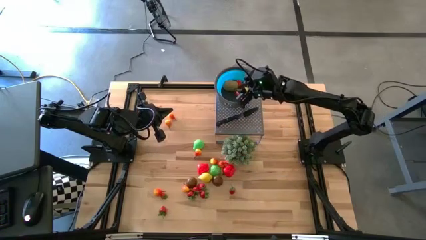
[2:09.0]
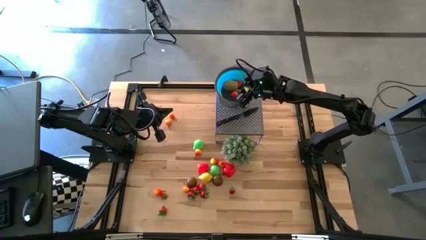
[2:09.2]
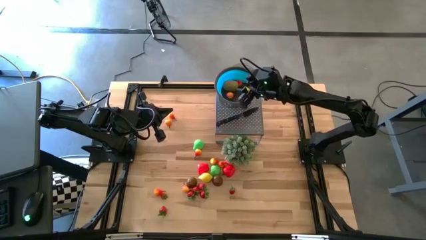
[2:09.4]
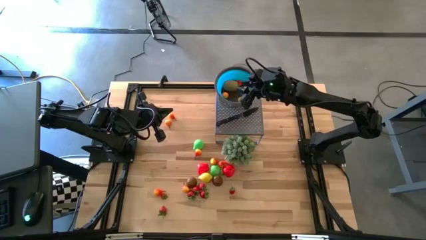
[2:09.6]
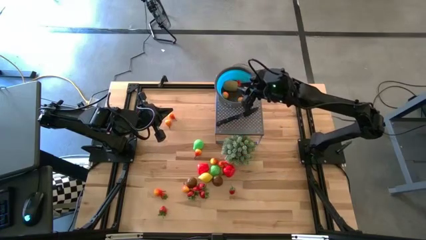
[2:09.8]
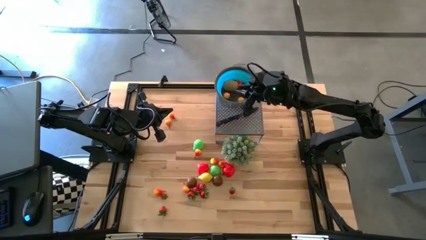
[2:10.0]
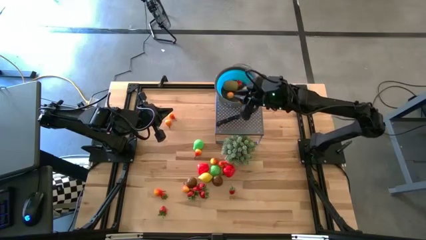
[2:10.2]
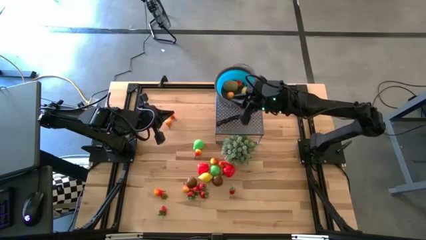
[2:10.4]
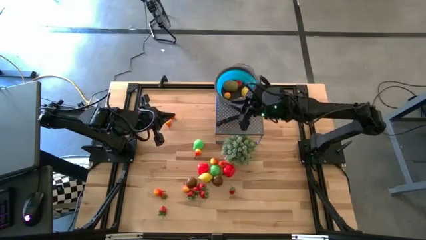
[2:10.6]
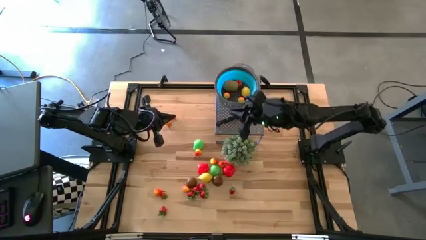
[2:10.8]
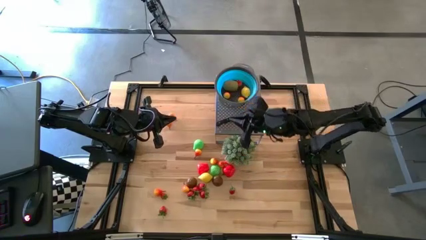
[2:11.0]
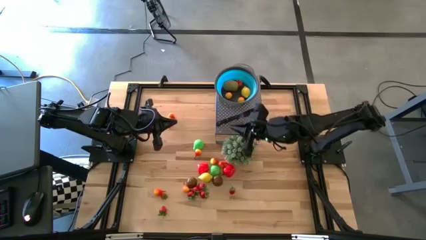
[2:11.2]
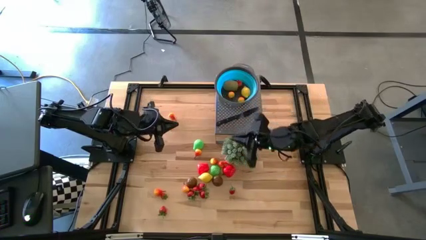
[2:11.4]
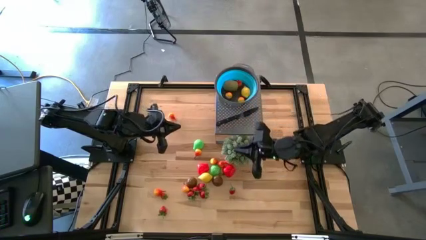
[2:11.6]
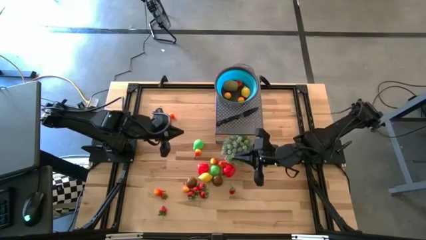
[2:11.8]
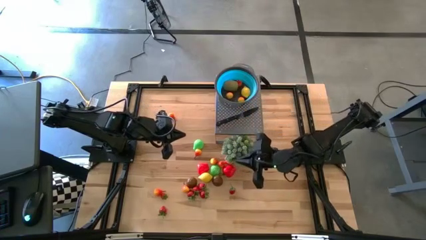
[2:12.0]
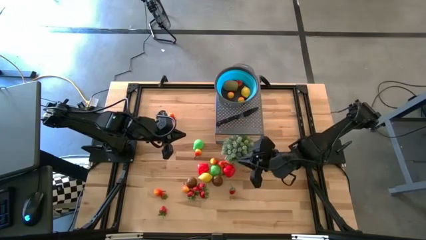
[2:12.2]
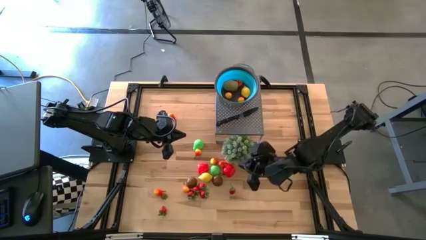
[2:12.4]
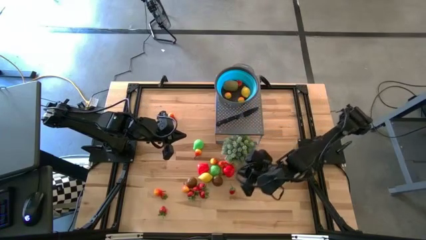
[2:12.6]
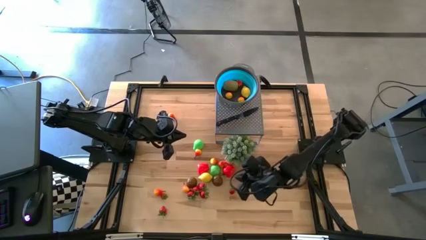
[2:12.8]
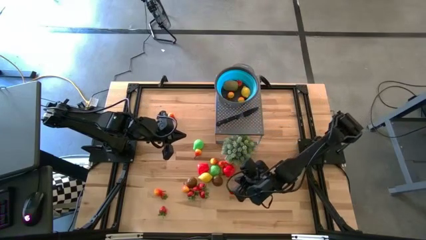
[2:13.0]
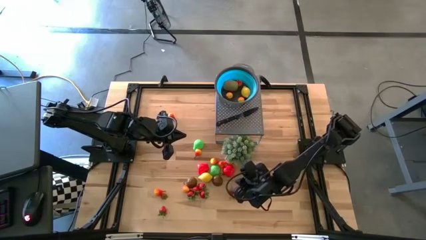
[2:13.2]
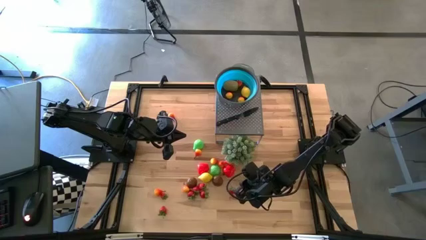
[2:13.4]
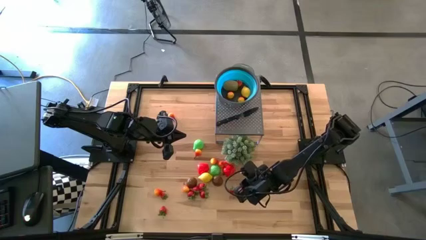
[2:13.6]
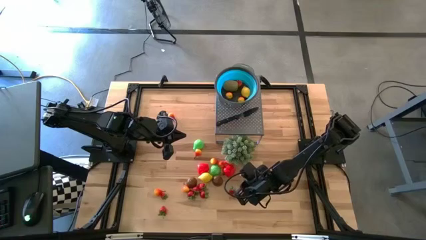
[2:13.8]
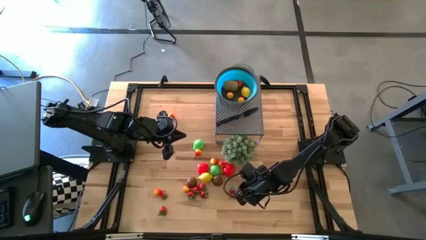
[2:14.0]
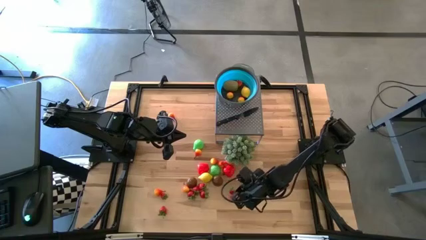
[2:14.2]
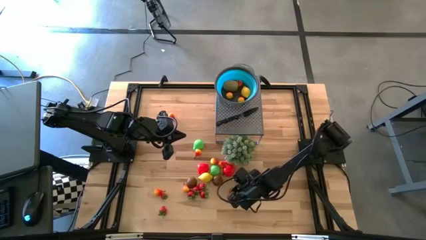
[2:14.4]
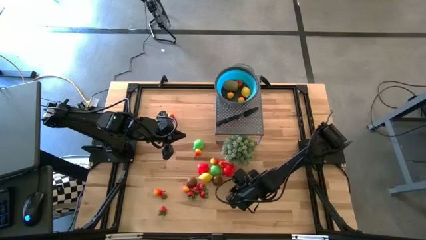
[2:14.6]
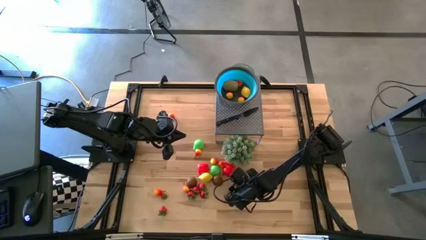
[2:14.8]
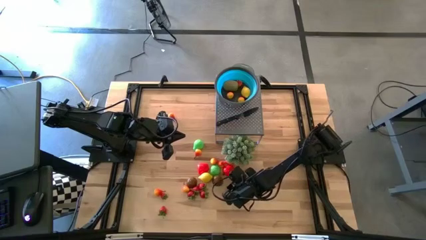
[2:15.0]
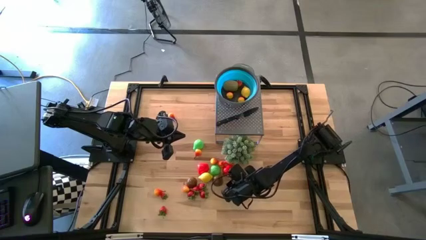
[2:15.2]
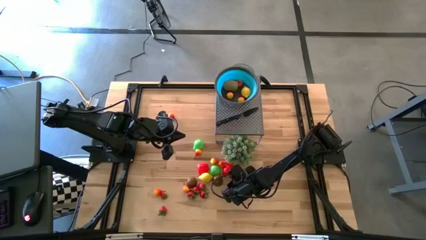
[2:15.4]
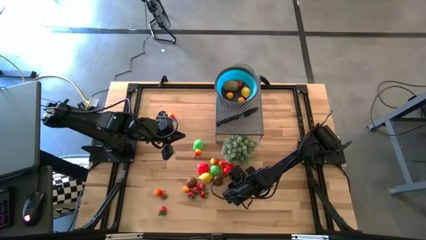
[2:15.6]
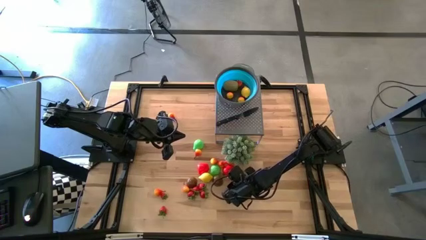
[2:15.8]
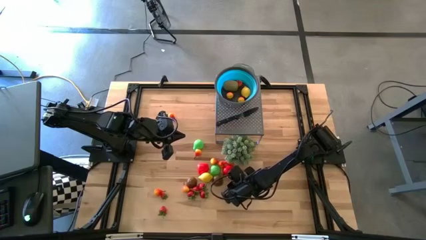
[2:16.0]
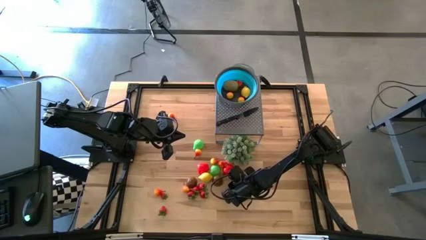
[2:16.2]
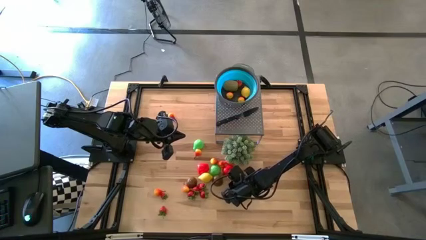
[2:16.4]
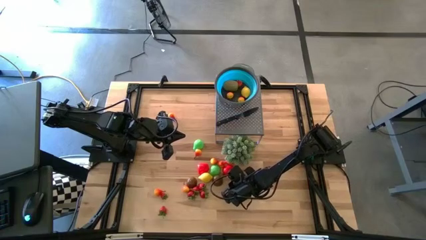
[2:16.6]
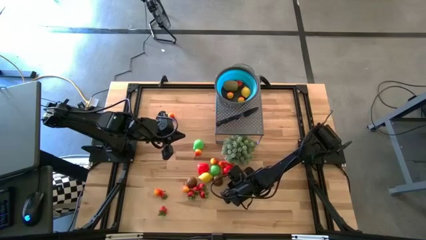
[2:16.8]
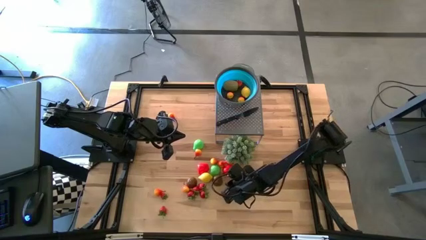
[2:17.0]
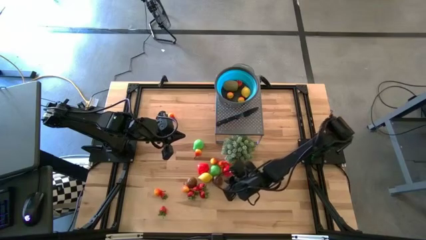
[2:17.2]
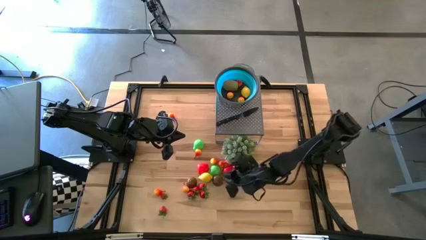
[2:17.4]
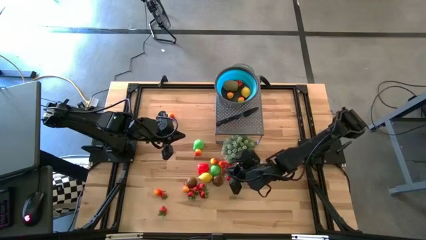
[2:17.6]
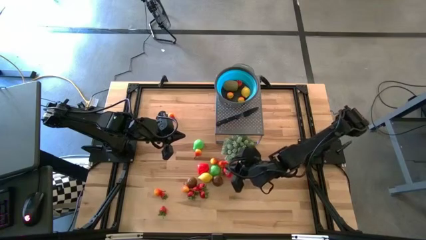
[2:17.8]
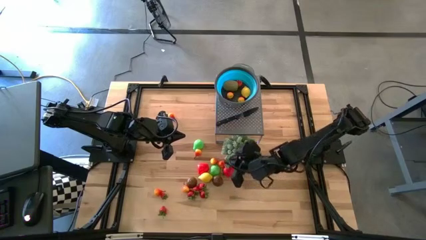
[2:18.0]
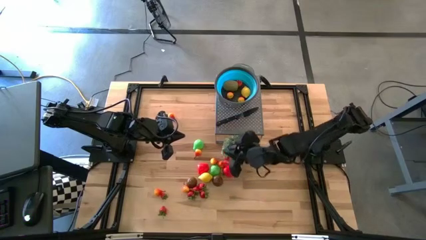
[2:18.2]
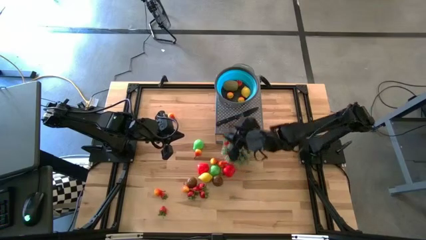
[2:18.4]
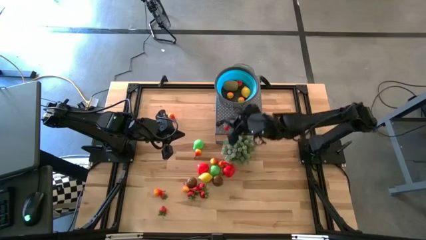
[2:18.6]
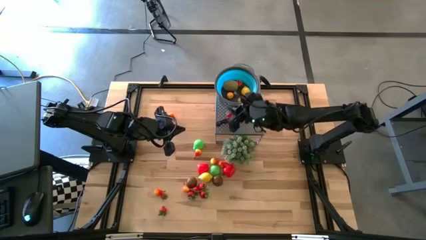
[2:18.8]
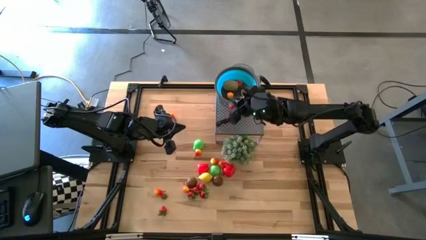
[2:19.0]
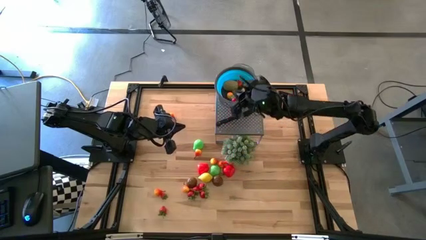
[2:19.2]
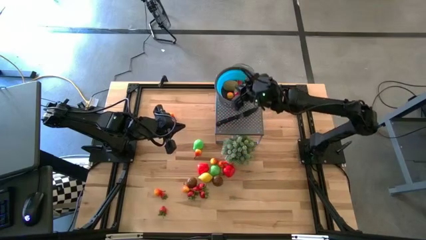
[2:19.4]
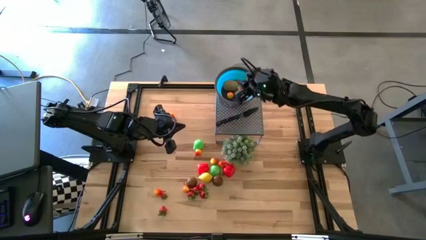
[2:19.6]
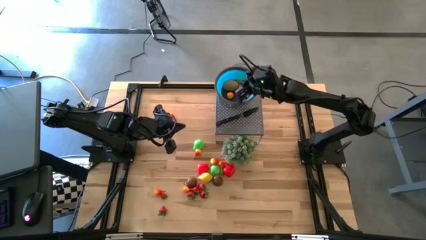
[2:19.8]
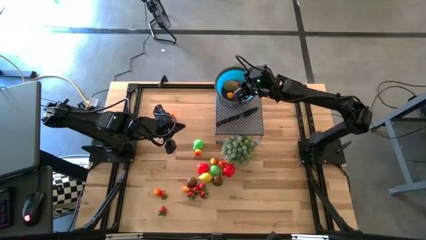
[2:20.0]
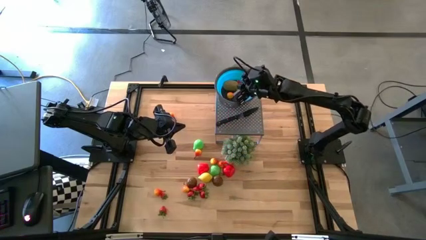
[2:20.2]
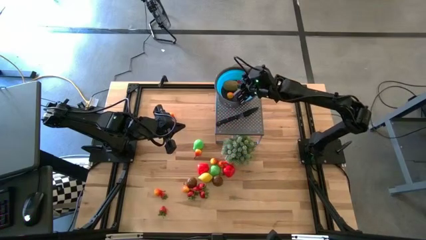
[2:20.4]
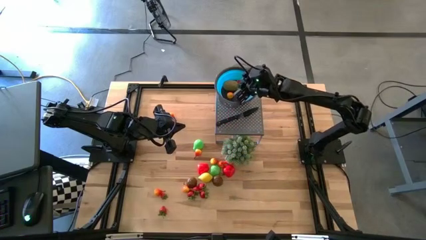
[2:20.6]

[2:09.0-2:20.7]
Task: Pick & Place Fruit
Put the red strawberry into the blue strainer bowl

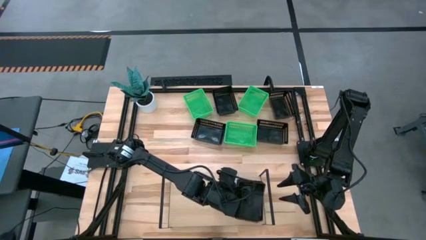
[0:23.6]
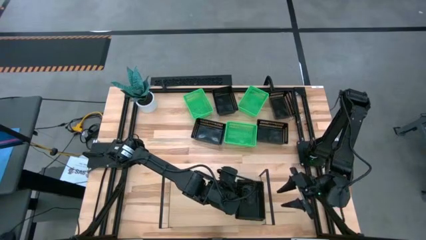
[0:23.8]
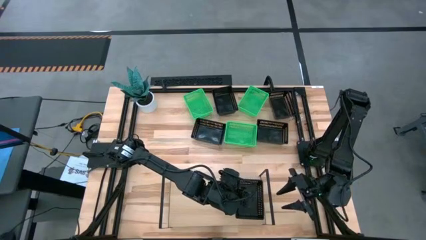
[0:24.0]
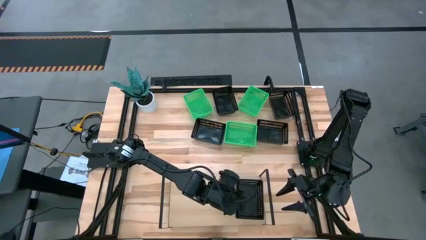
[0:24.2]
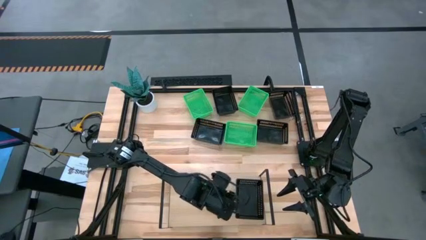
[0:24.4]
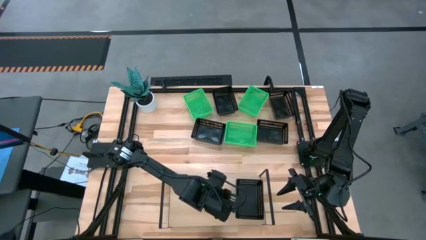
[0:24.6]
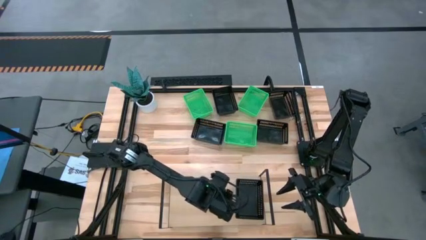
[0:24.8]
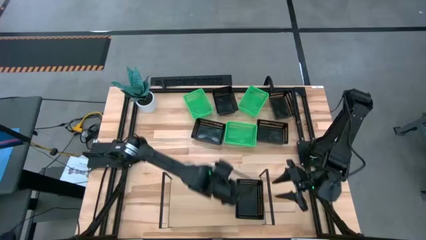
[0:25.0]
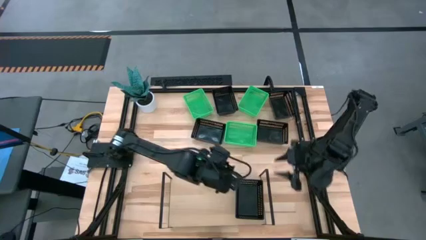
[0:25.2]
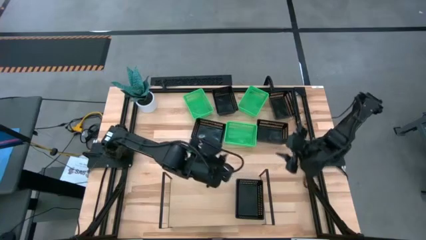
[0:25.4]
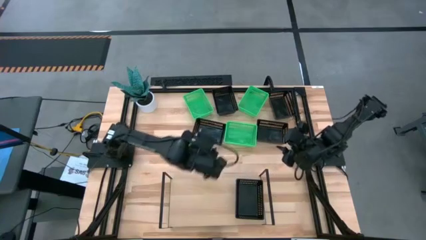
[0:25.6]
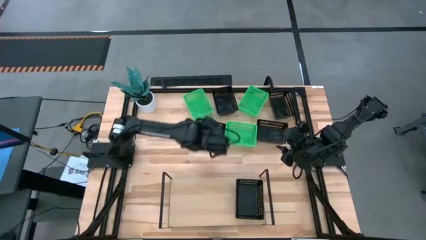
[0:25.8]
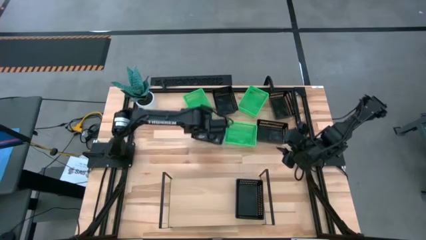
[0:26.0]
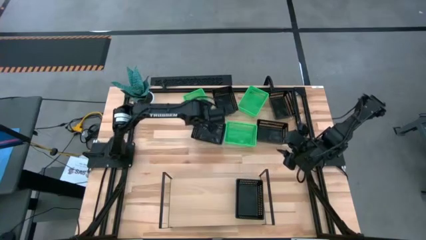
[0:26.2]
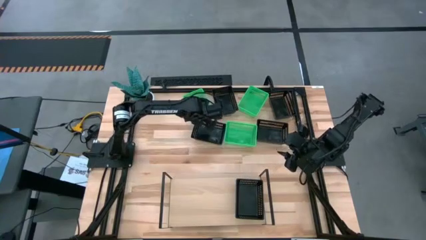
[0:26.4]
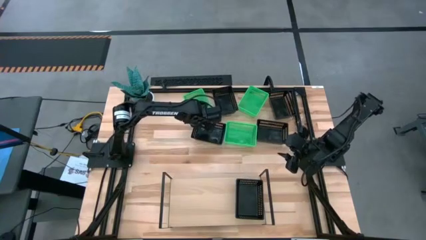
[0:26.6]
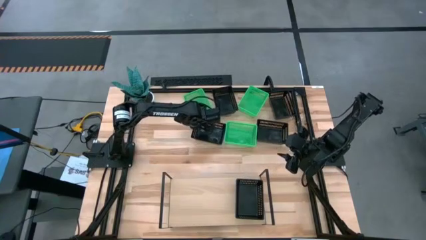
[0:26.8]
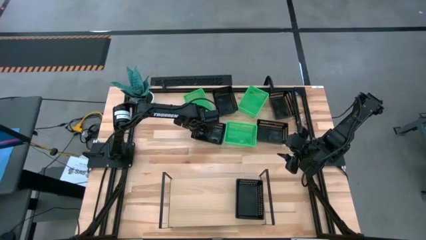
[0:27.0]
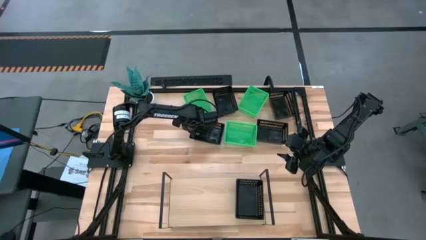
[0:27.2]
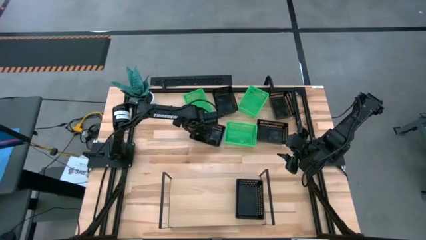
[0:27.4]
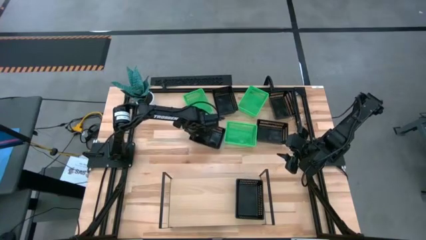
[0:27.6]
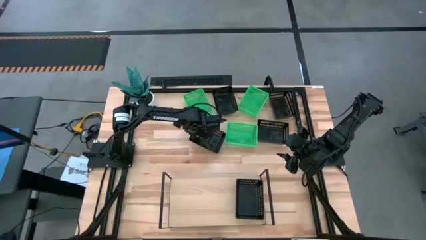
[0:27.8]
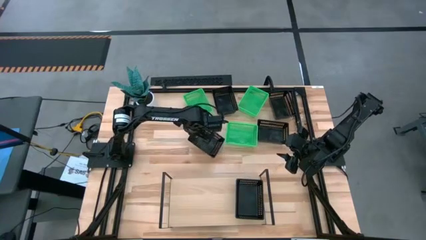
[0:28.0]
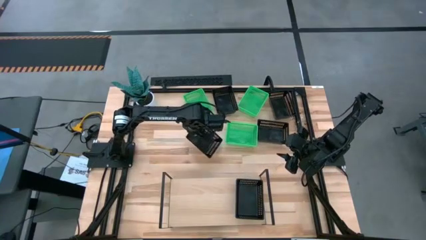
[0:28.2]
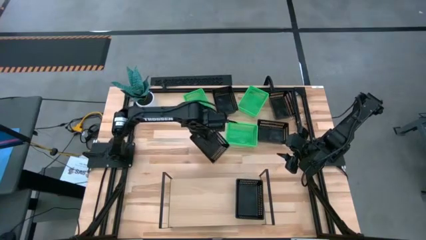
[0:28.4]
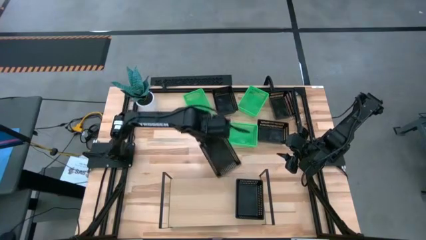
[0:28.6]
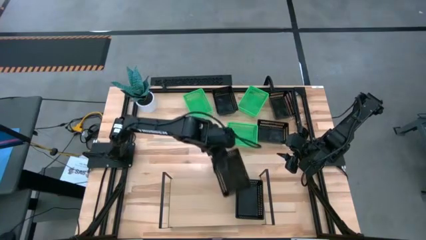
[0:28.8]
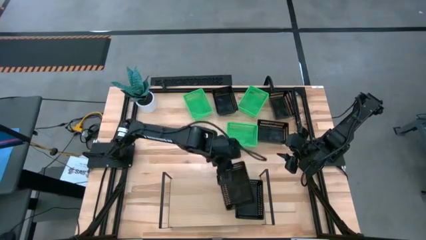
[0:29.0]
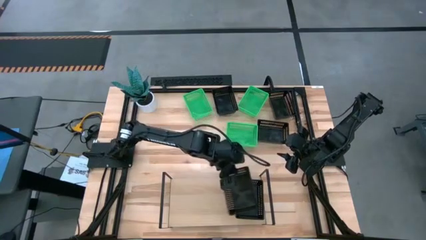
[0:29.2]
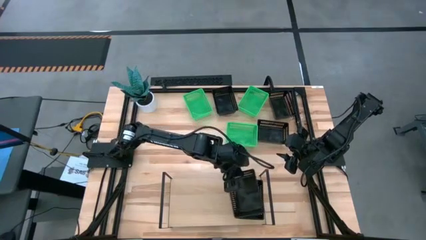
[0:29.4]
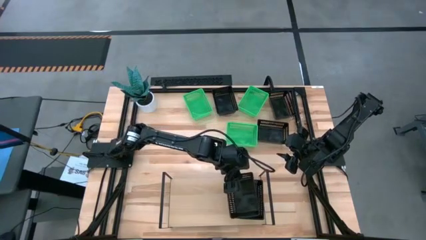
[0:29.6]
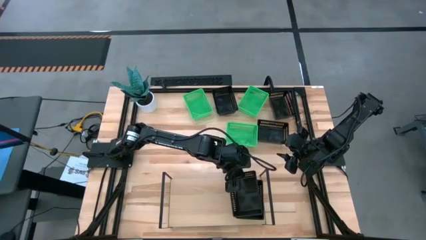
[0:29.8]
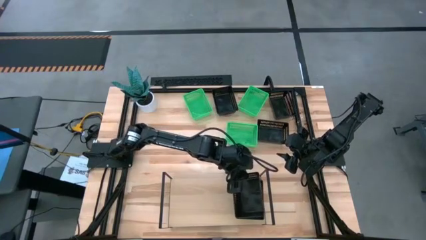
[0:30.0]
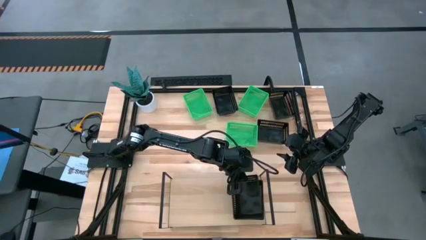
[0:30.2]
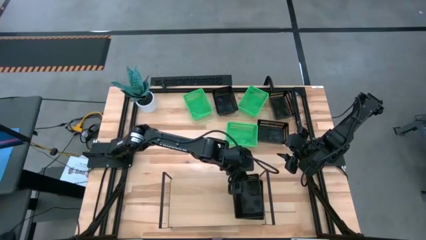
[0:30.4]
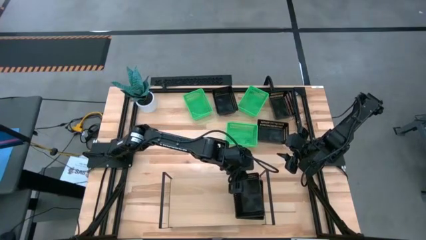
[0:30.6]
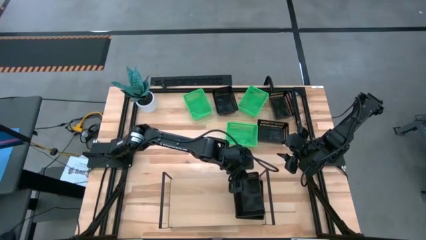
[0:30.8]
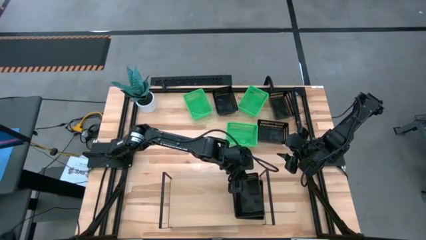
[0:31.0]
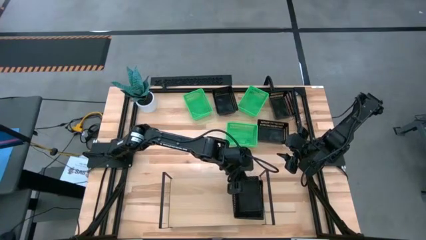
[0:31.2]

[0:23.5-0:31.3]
Task: Stack baskets on shelf by color
Stack the black bin on the black bin on the shelf
